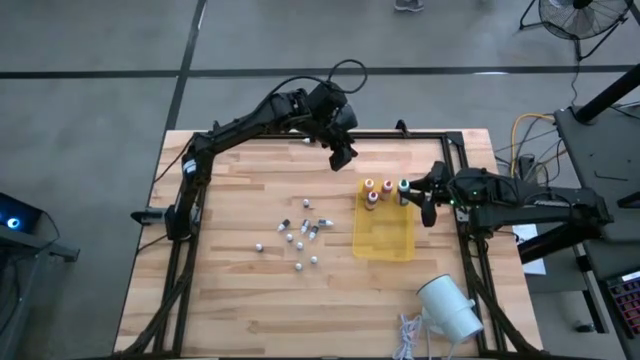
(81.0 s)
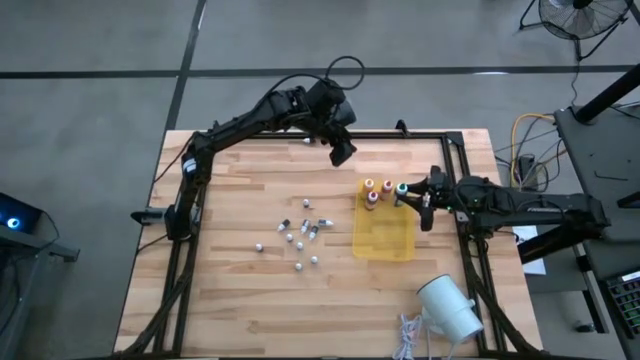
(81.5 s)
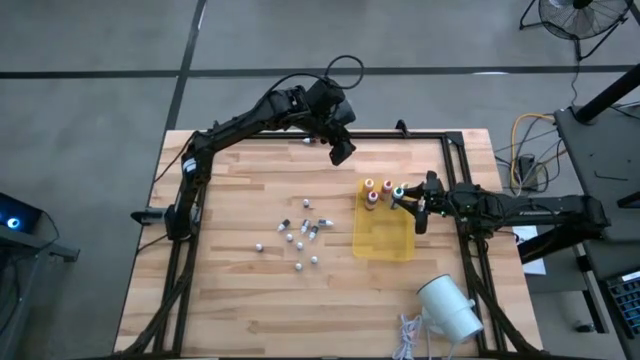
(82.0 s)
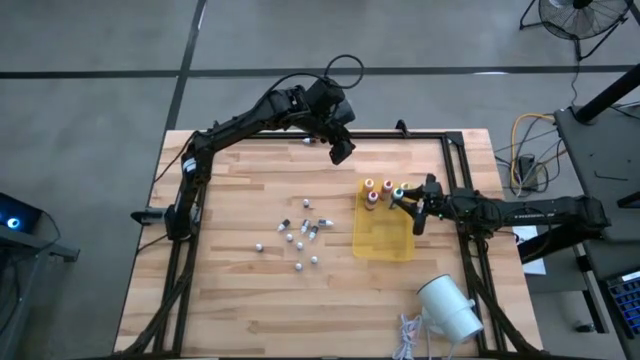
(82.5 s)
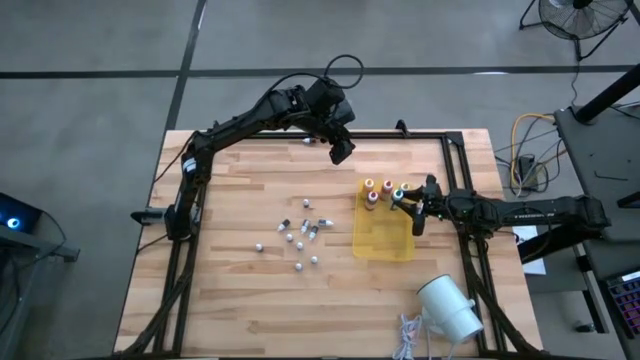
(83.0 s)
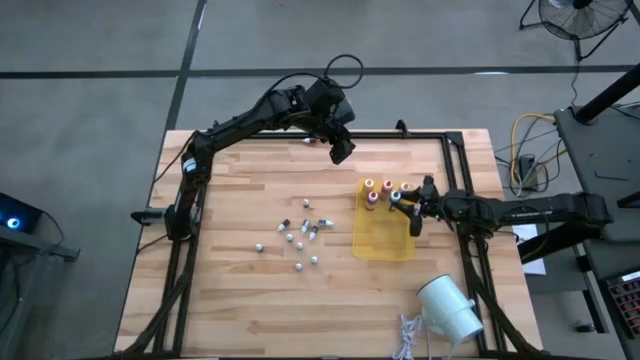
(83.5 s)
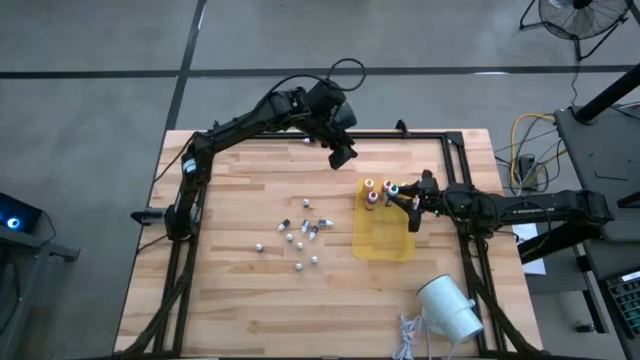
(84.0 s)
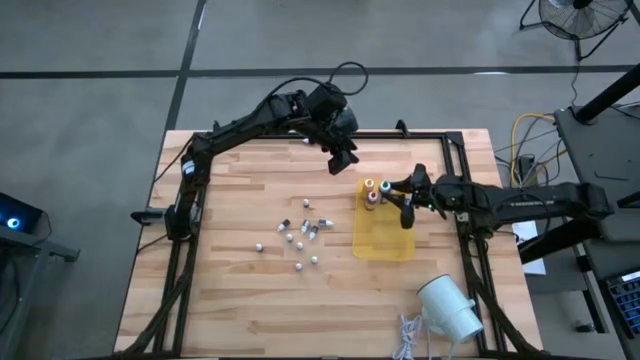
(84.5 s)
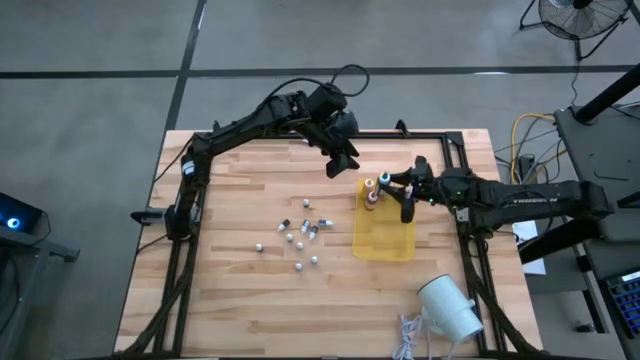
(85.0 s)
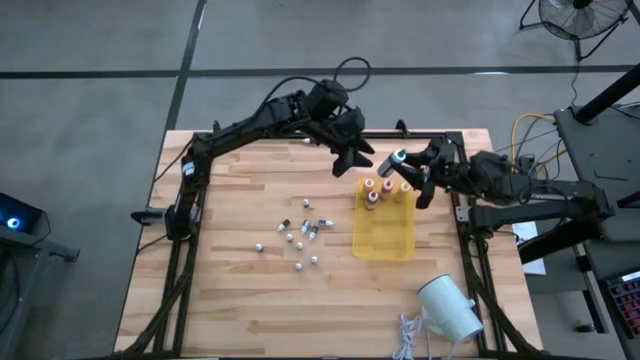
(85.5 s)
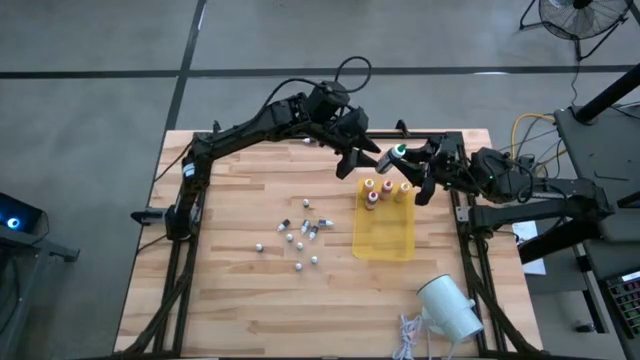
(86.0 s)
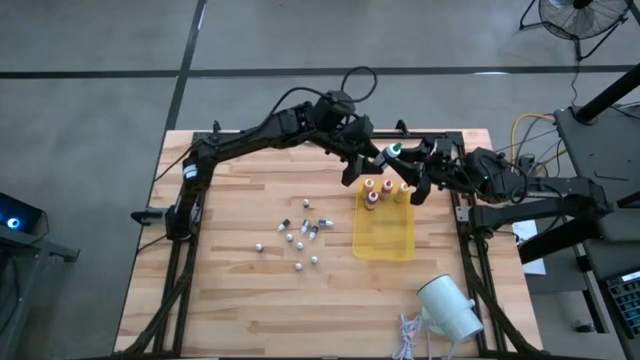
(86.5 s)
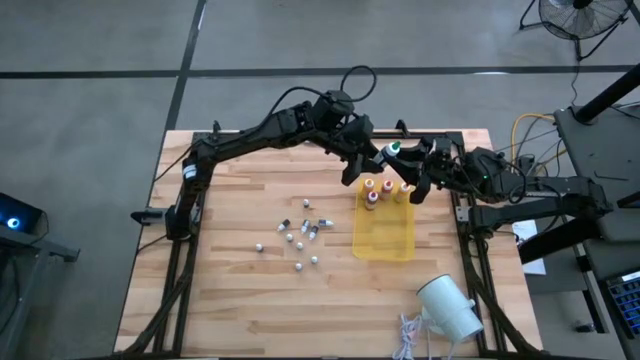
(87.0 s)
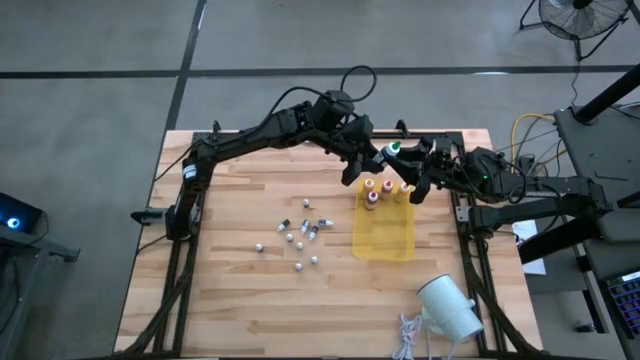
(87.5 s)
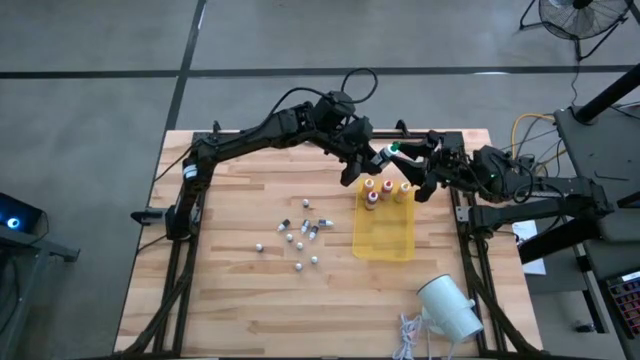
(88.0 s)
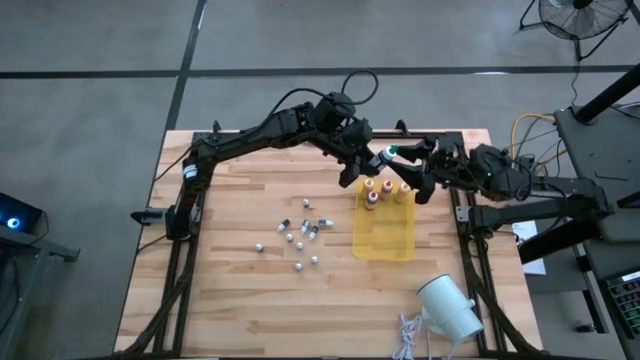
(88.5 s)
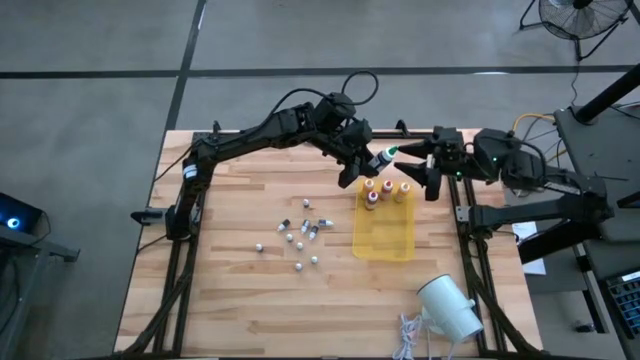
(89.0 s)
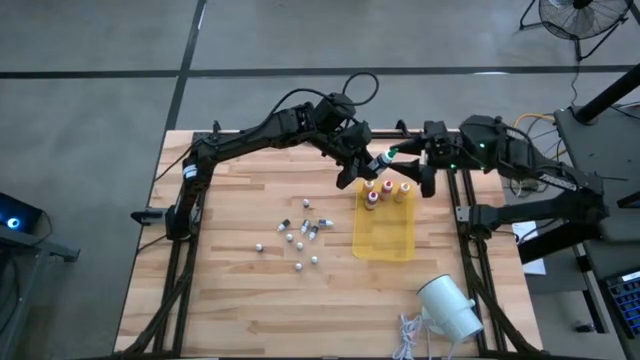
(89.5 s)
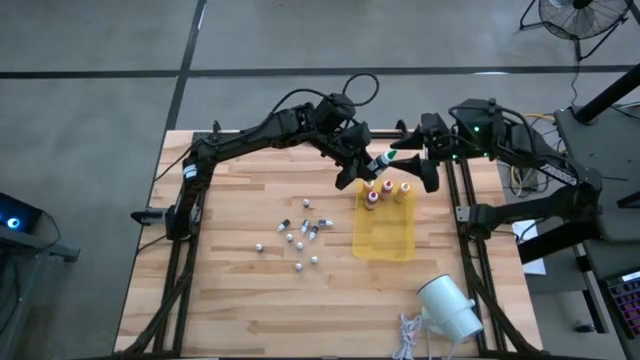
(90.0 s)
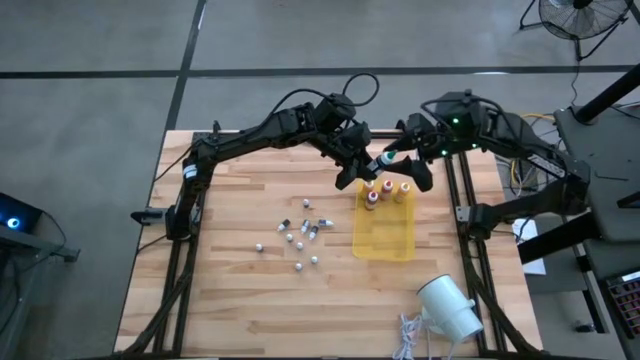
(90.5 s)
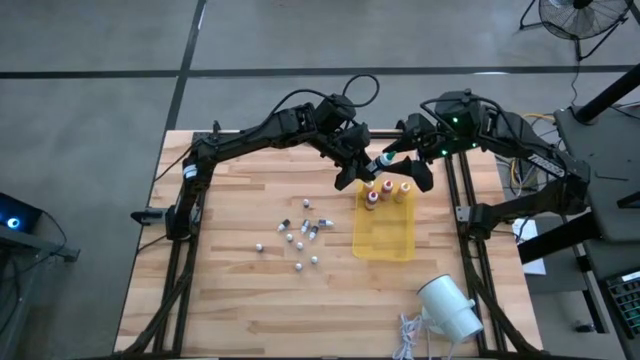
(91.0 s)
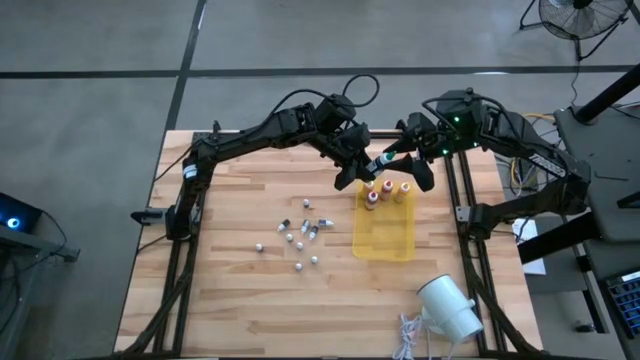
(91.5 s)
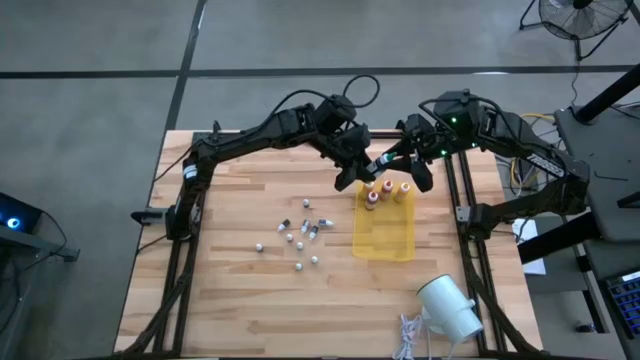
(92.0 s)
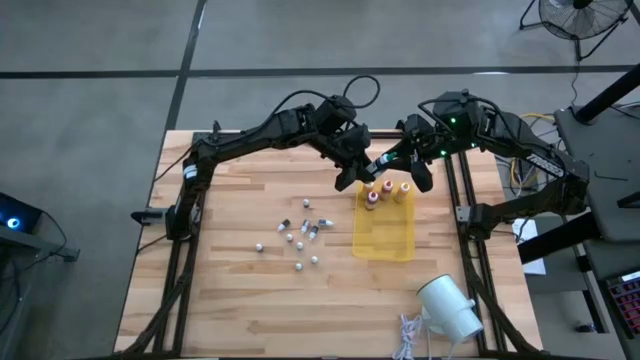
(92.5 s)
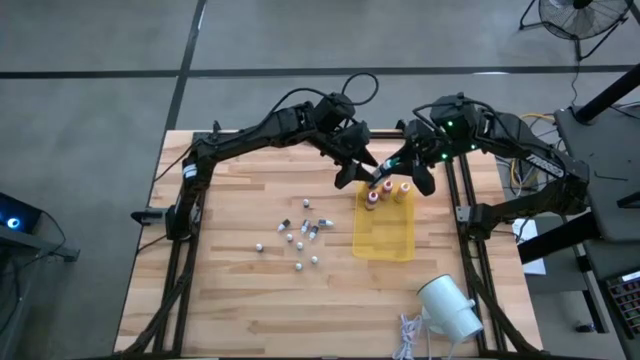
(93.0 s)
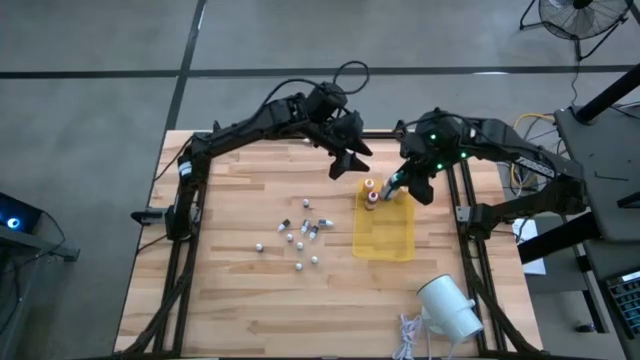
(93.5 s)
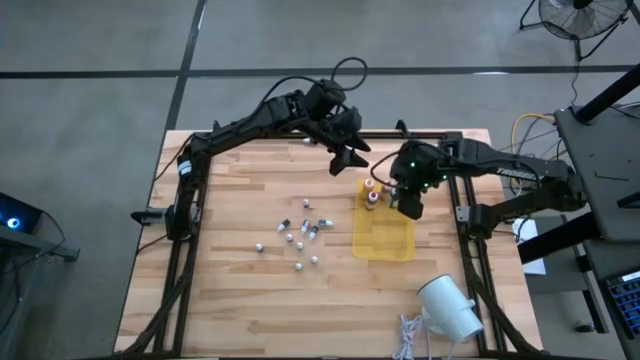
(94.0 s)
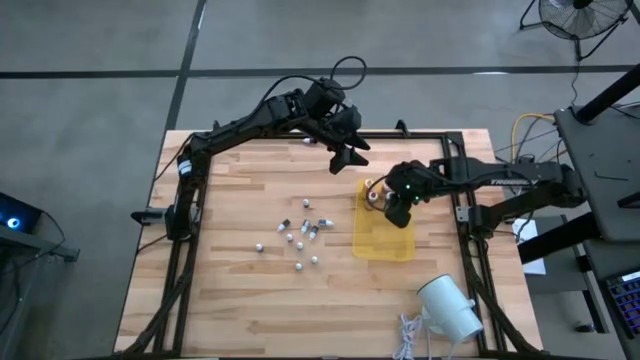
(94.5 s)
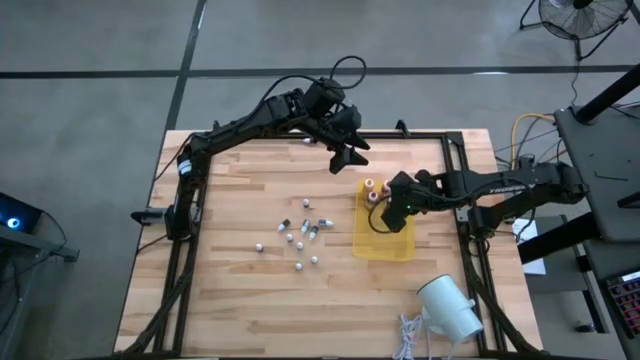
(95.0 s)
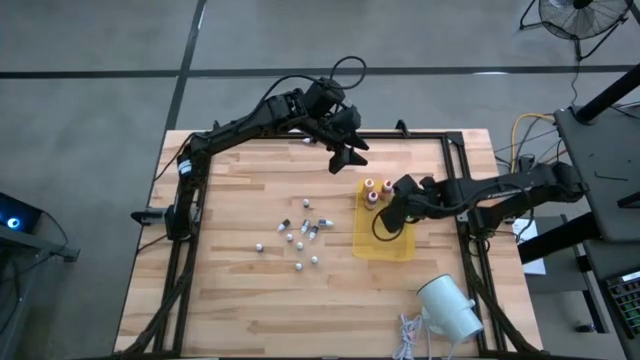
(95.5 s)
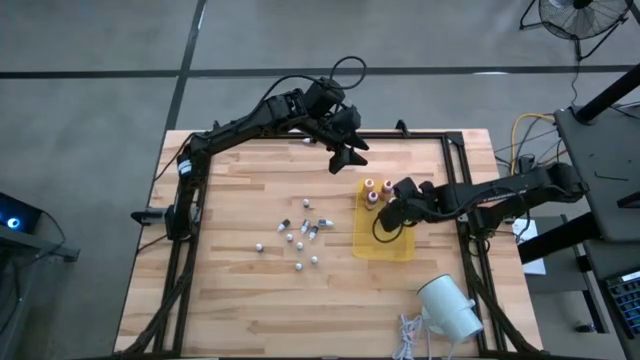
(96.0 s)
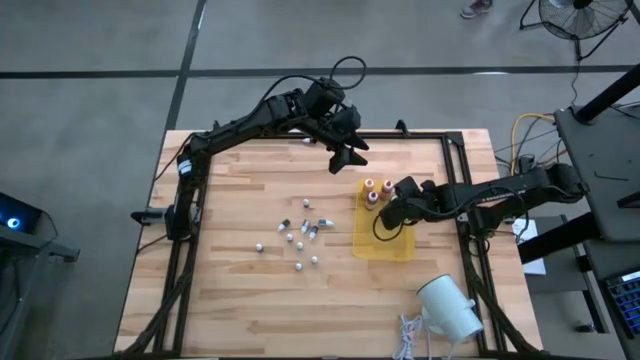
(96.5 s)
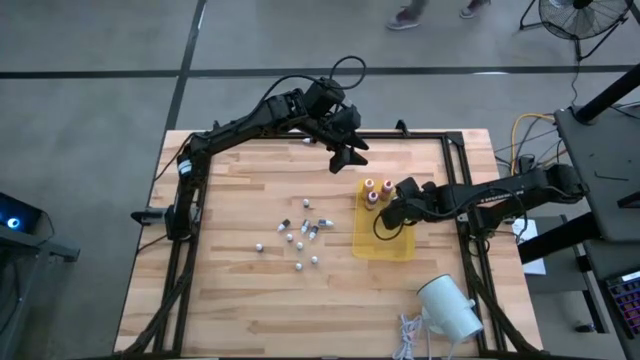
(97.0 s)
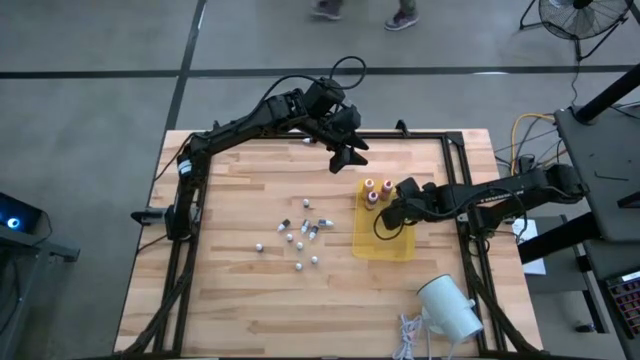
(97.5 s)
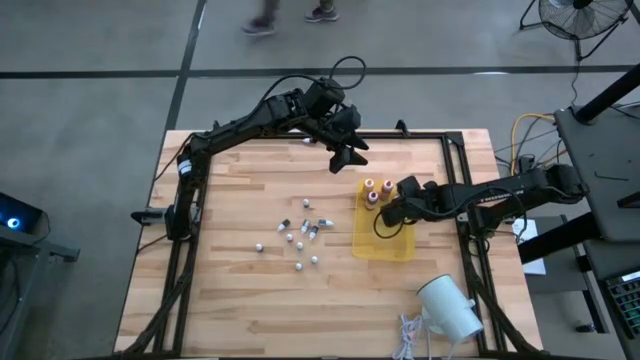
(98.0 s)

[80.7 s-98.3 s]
Task: Pick & Place food coloring
Put the big green food coloring bottle into the yellow bin
